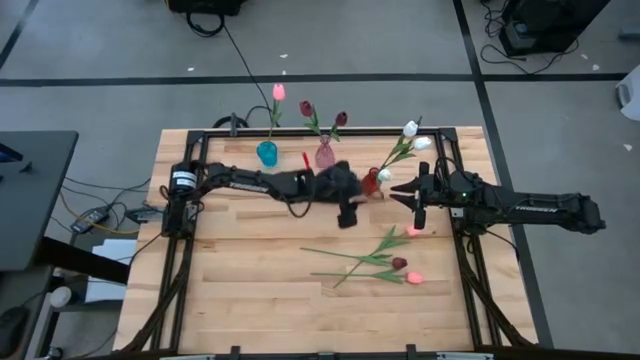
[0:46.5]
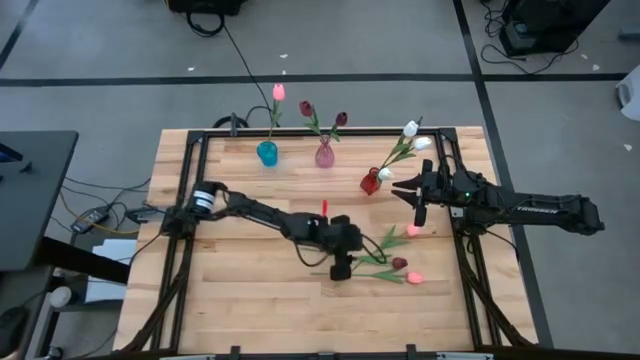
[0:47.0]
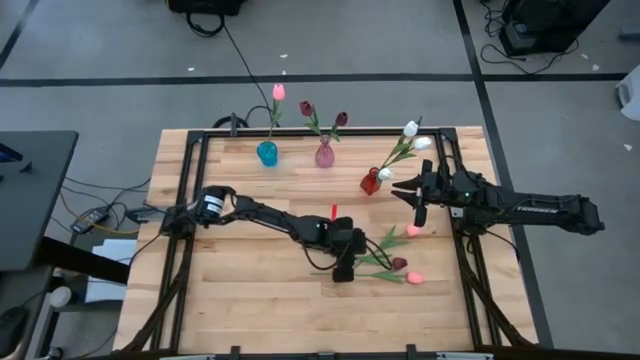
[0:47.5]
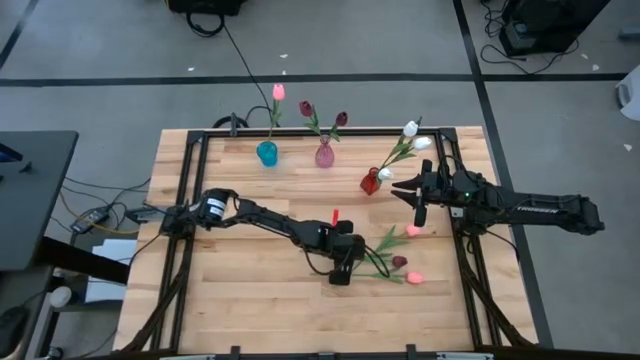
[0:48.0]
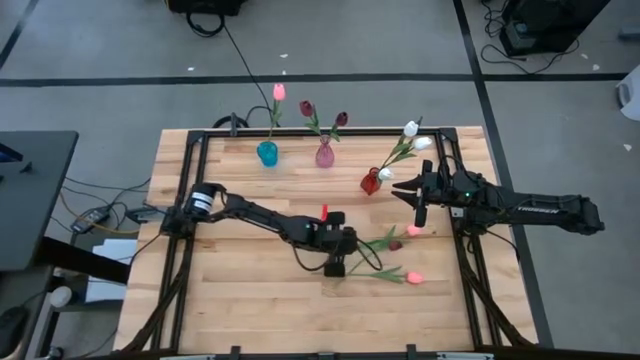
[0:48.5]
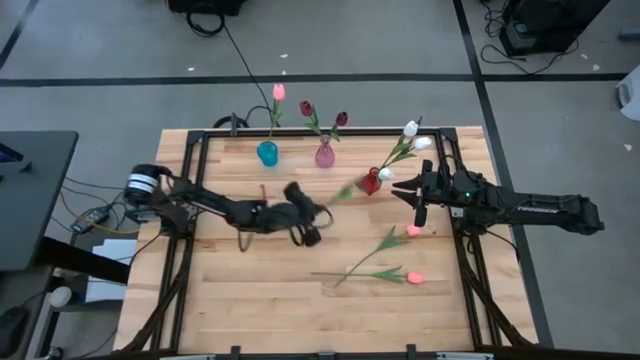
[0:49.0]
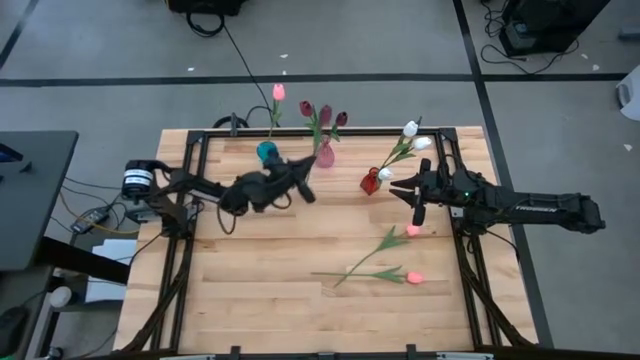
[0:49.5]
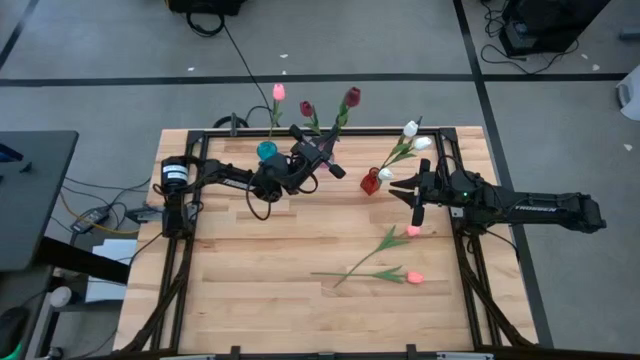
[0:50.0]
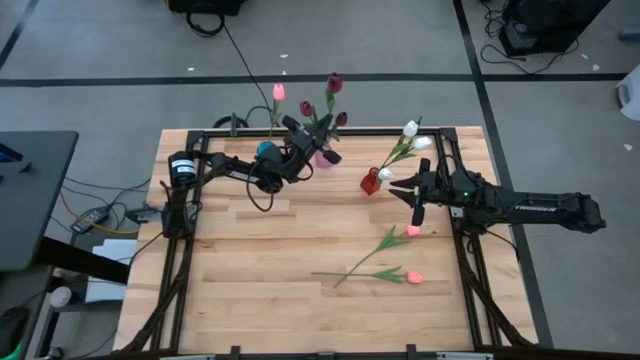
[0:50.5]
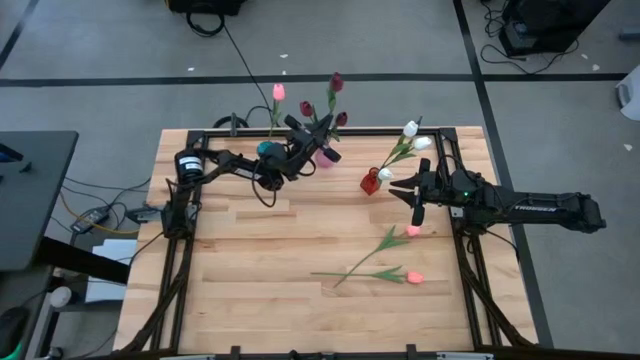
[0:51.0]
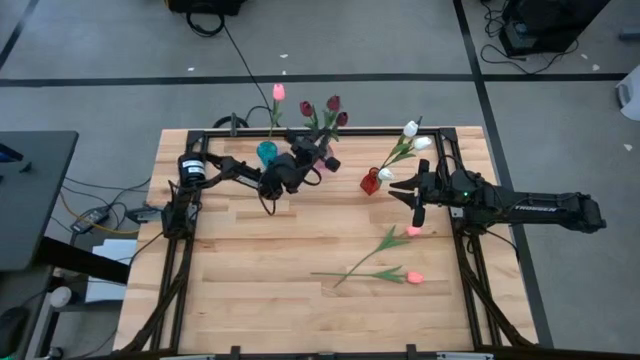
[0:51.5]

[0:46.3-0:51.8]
Task: Sort flowers into vase by color
Put the dark red flower into the violet vase

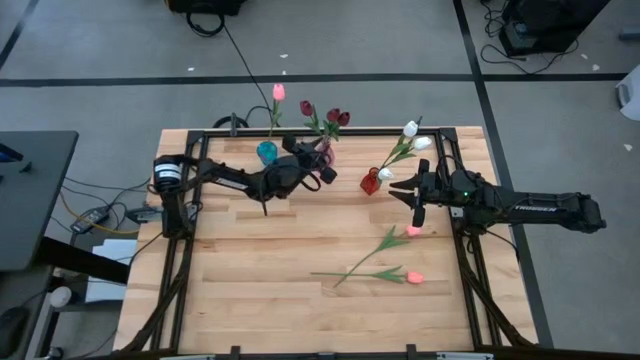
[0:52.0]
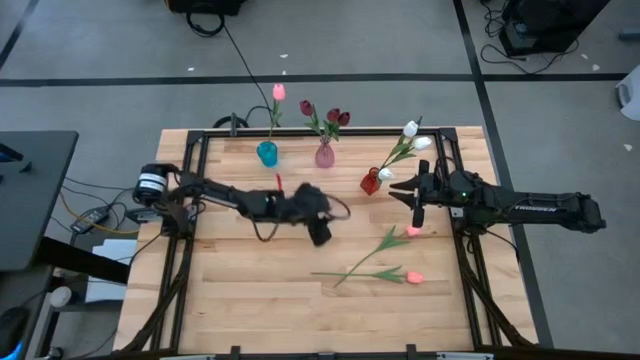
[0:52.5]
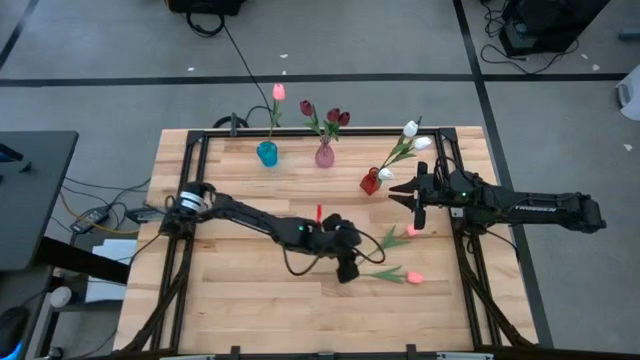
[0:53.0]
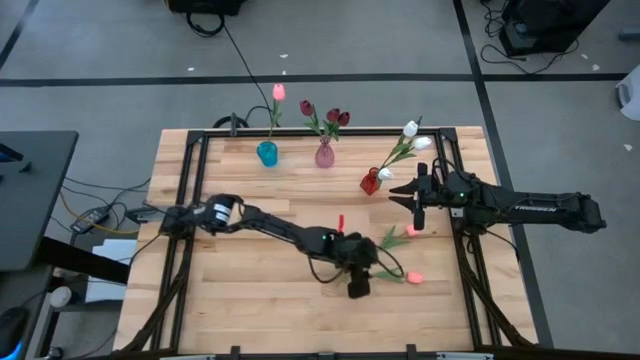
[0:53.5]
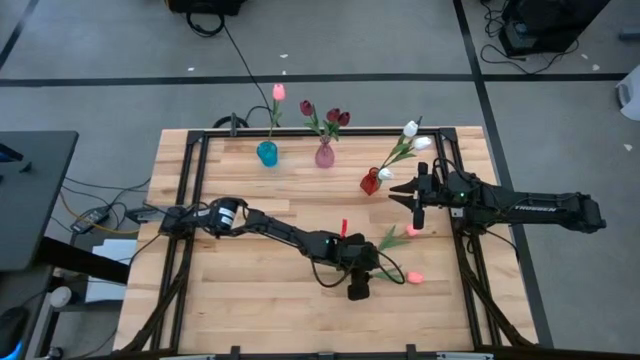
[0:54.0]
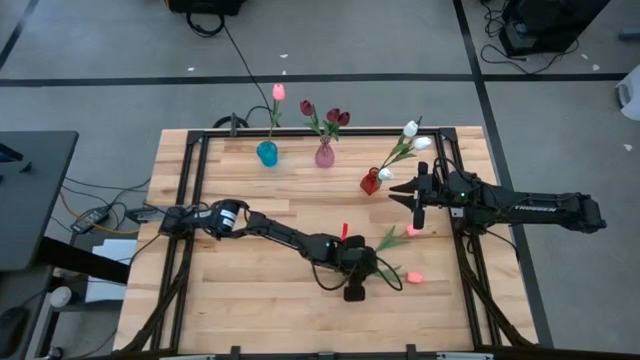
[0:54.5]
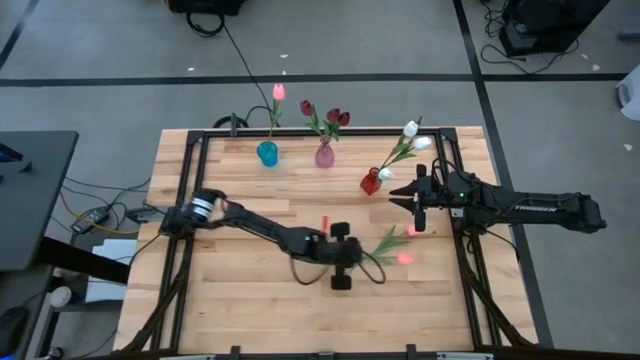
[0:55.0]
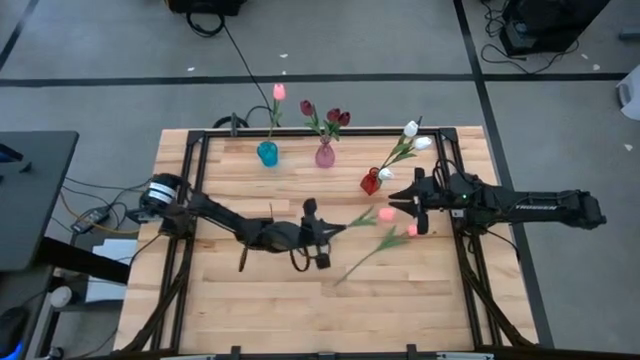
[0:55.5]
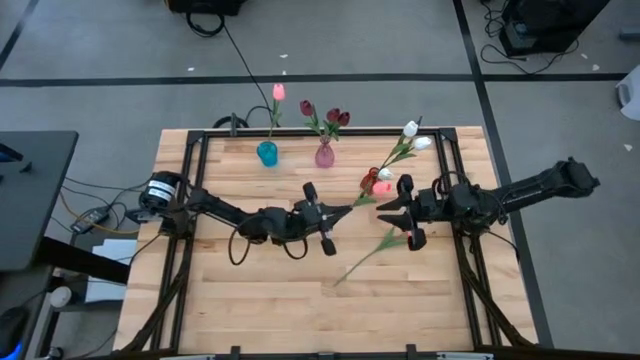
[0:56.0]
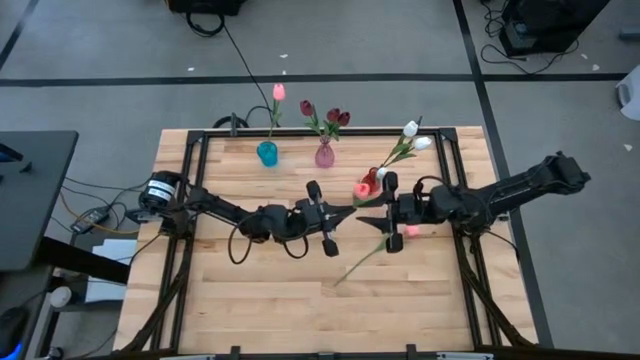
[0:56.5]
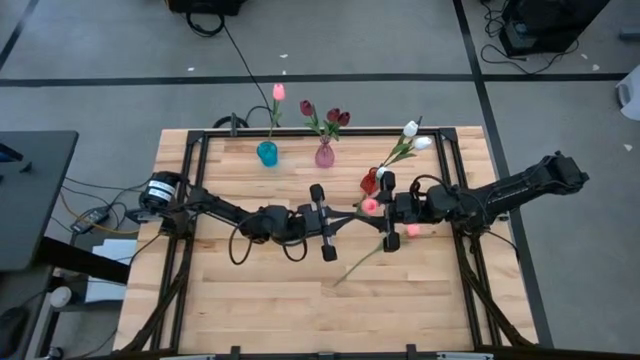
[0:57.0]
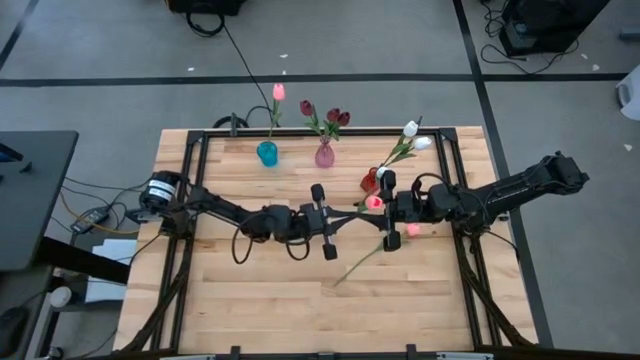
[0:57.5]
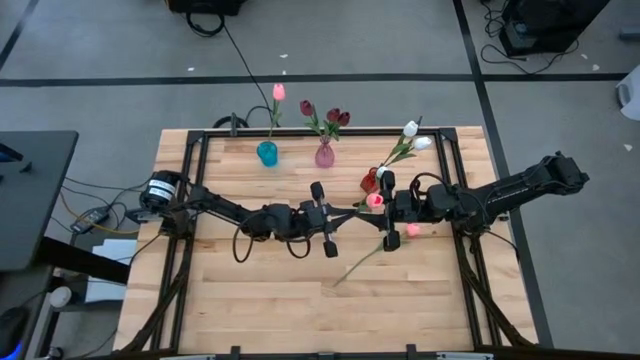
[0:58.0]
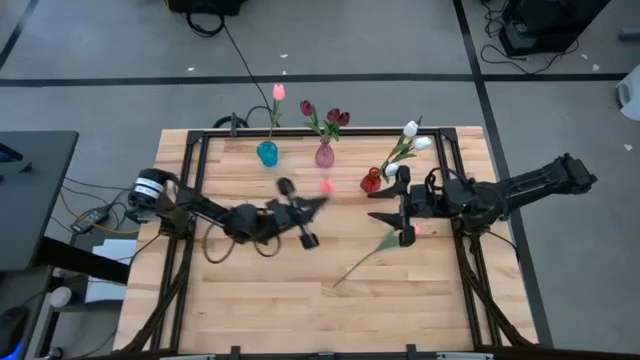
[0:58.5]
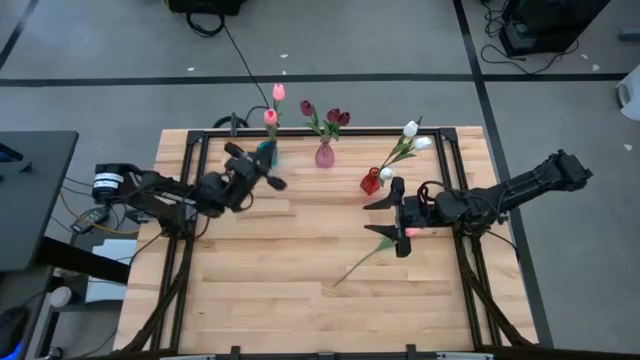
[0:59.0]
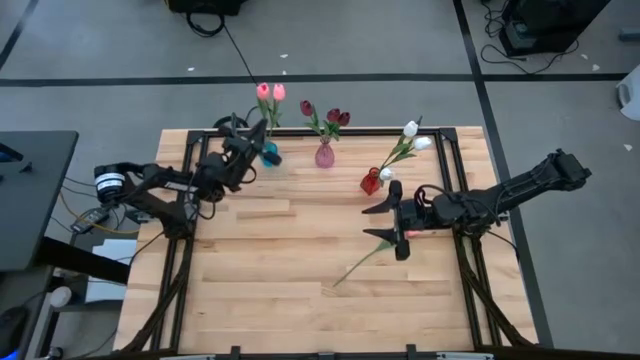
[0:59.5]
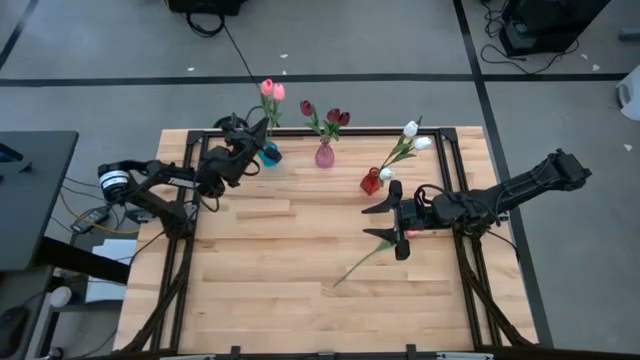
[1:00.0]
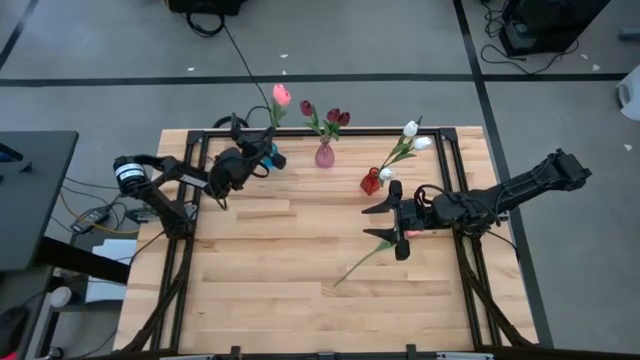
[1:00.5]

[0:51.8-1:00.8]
Put the bottom pink flower into the blue vase

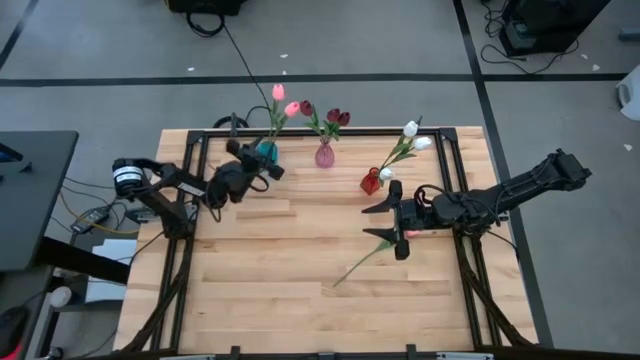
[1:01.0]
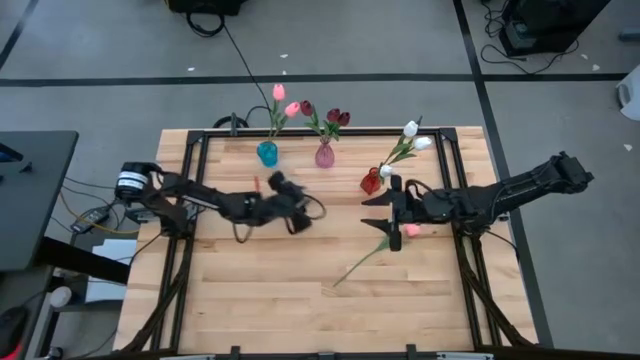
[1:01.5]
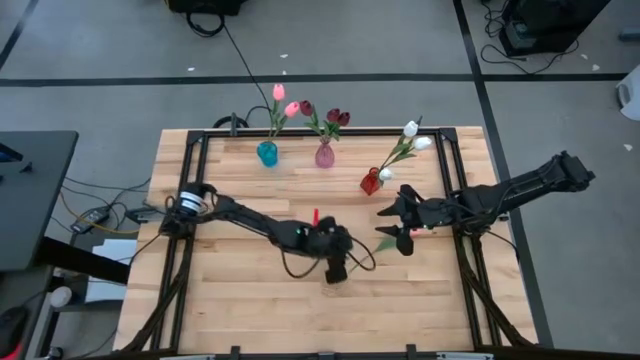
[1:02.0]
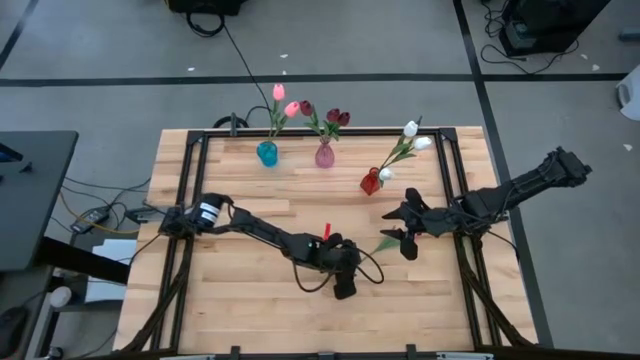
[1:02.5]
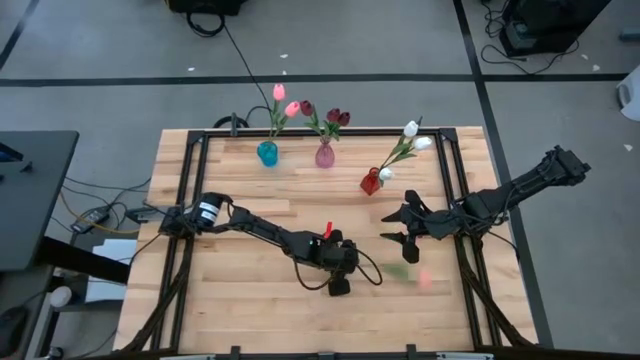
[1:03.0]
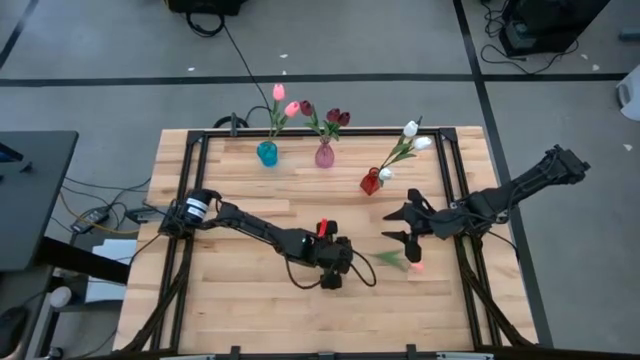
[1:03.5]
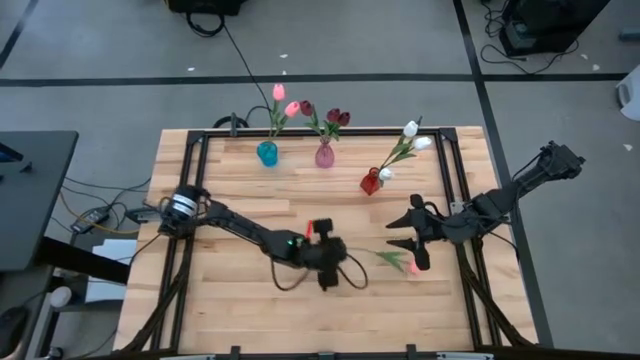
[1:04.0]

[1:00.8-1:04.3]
Put the pink flower into the blue vase

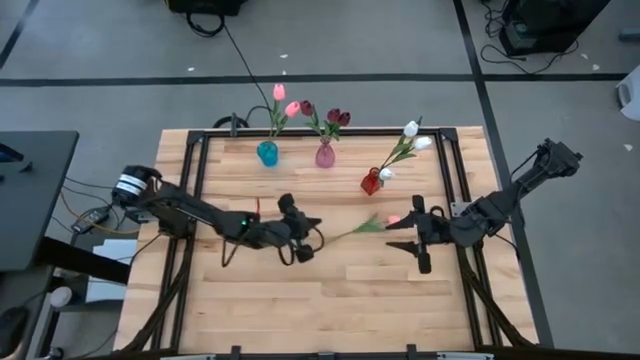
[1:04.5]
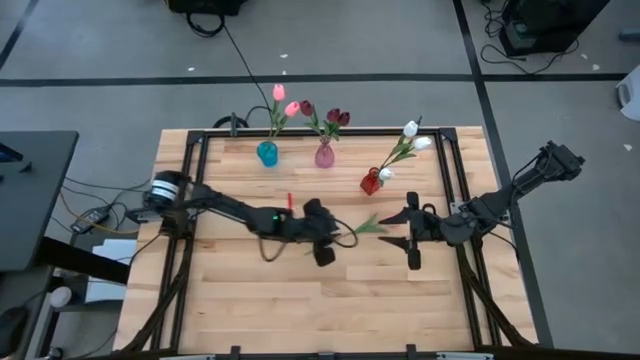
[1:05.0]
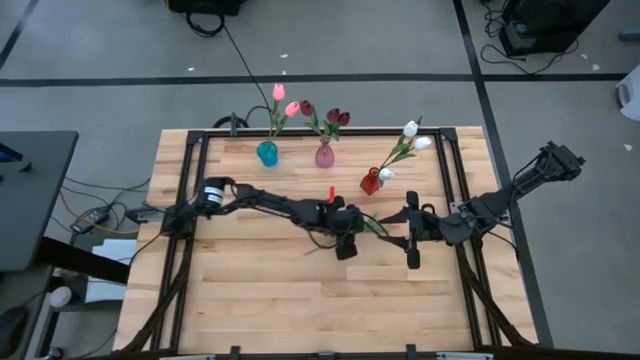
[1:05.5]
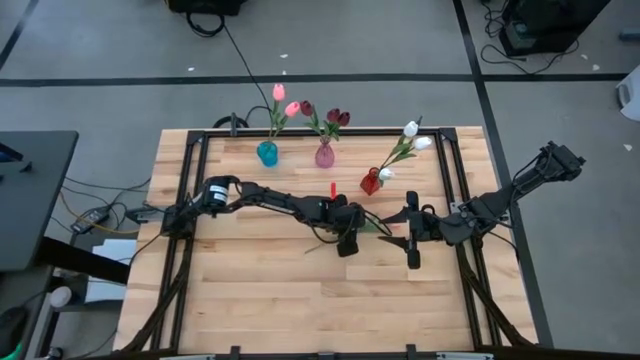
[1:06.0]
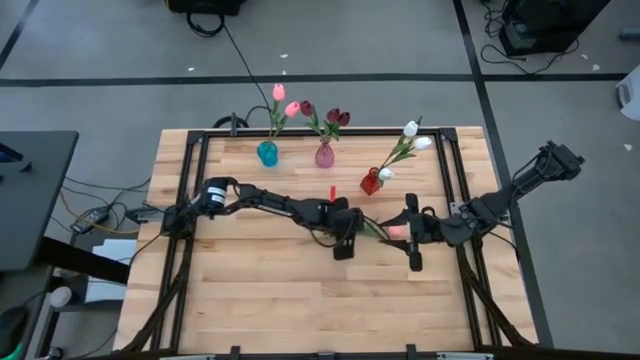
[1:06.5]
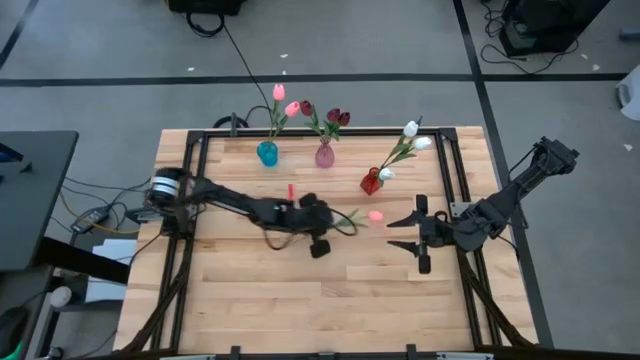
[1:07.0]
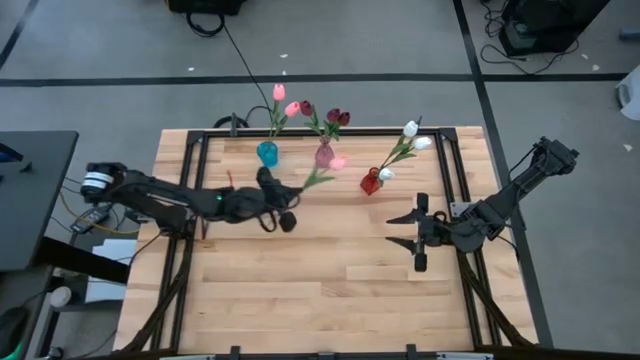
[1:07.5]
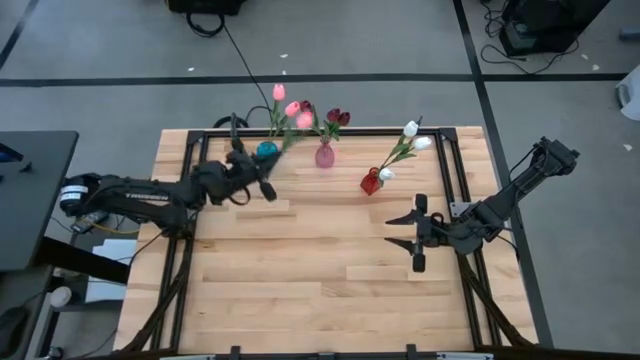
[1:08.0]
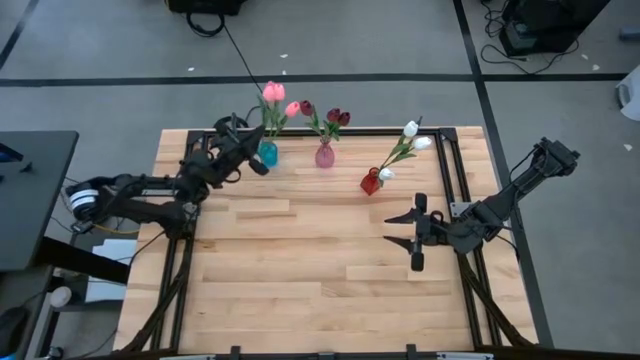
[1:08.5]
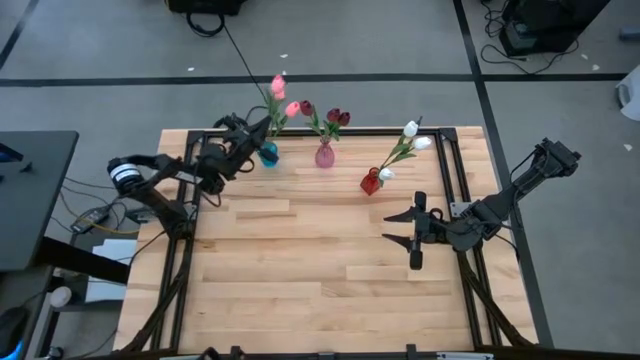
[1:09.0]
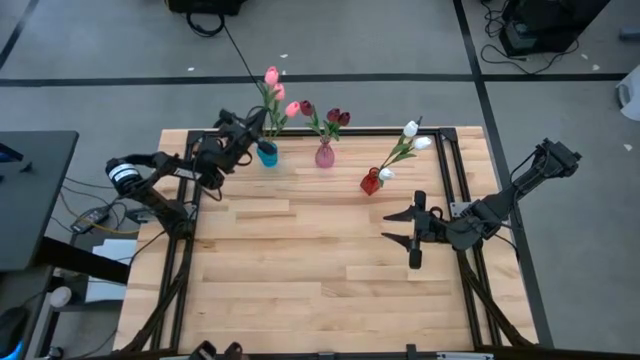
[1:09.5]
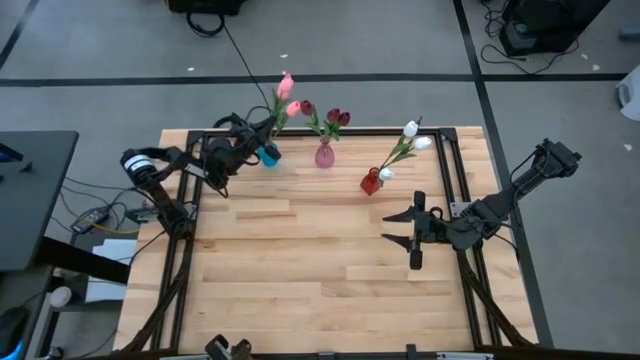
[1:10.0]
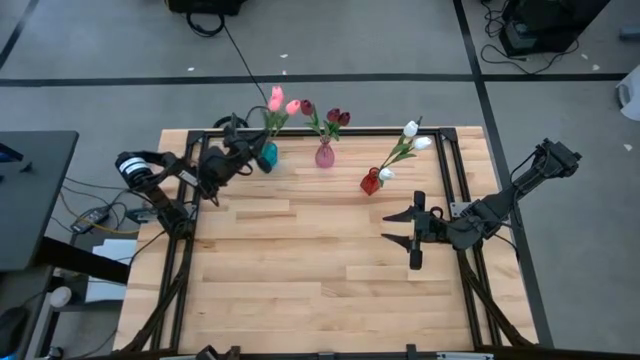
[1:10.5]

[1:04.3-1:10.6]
Put the pink flower into the blue vase
